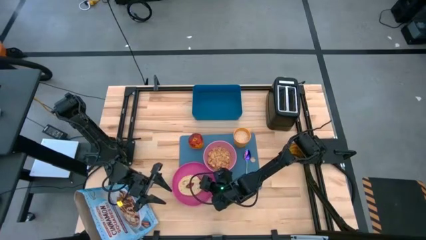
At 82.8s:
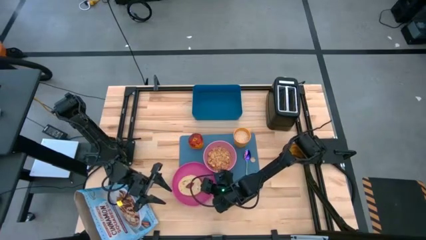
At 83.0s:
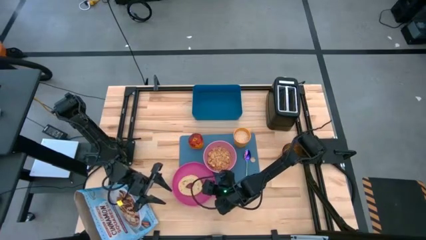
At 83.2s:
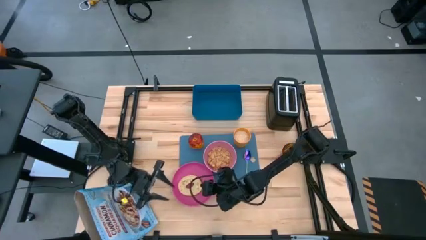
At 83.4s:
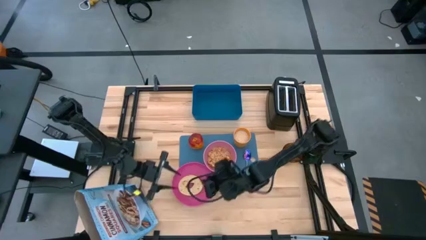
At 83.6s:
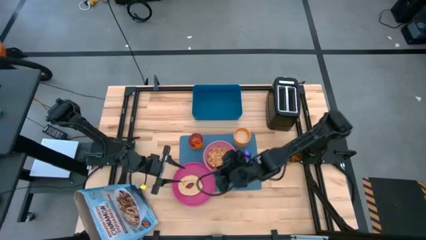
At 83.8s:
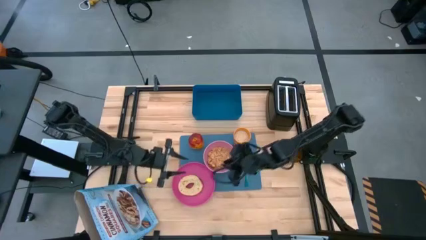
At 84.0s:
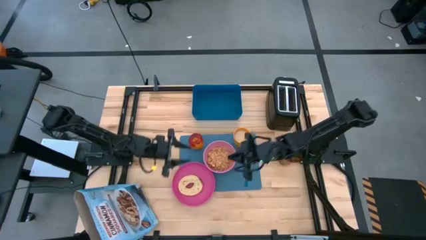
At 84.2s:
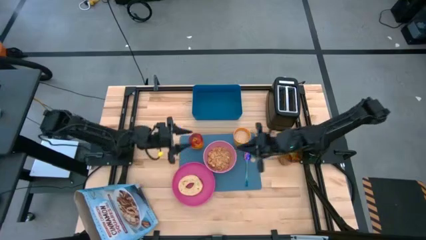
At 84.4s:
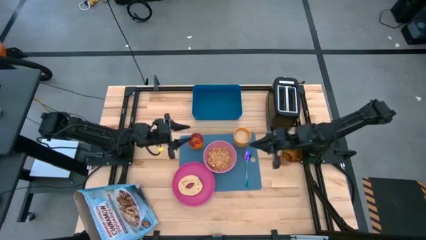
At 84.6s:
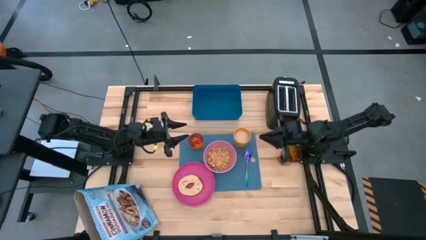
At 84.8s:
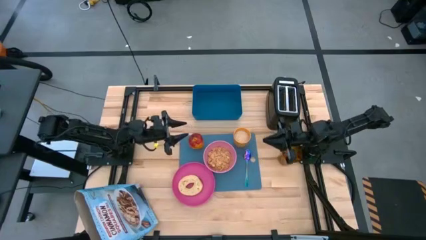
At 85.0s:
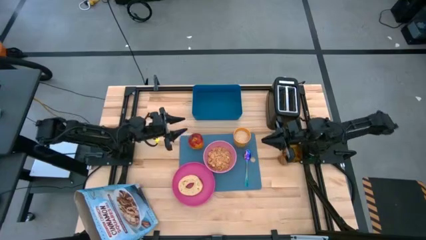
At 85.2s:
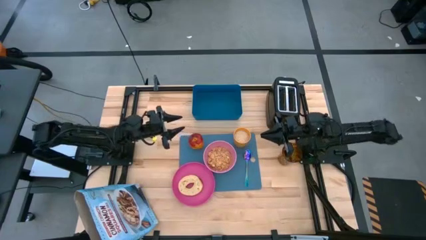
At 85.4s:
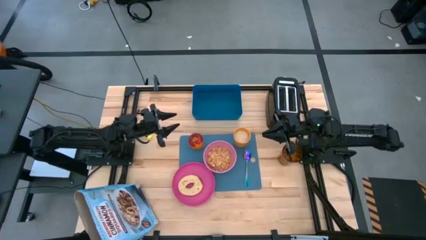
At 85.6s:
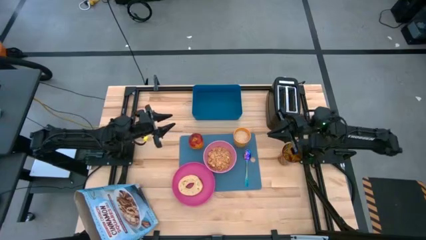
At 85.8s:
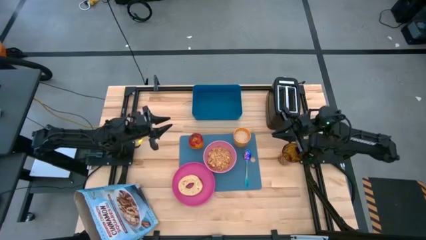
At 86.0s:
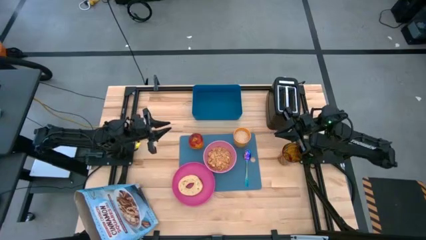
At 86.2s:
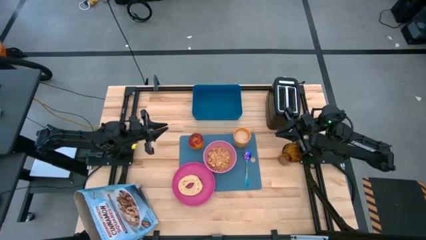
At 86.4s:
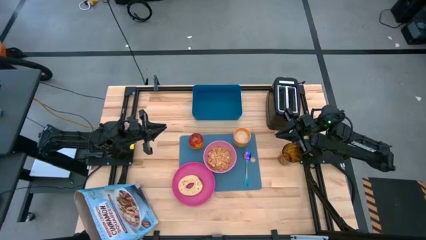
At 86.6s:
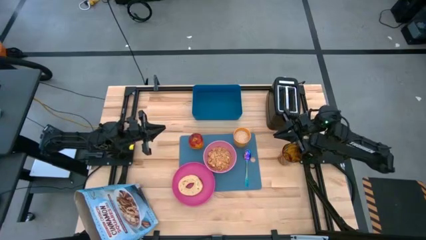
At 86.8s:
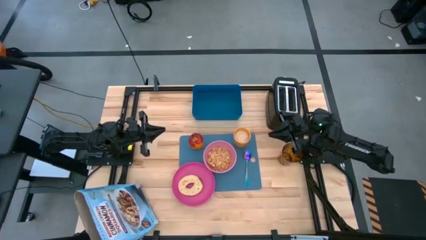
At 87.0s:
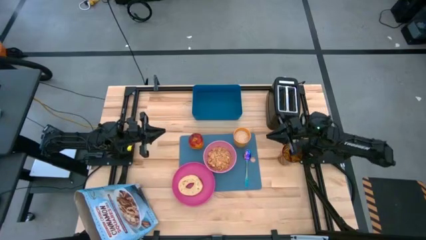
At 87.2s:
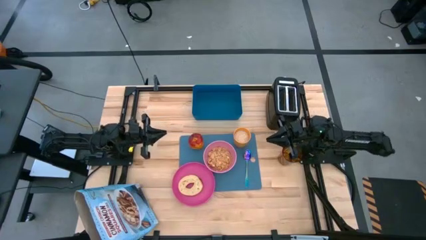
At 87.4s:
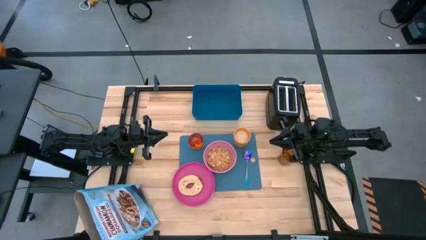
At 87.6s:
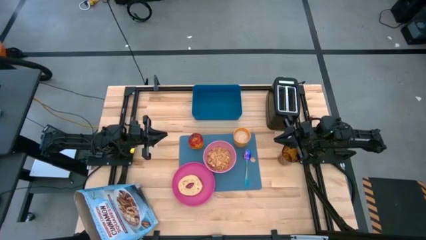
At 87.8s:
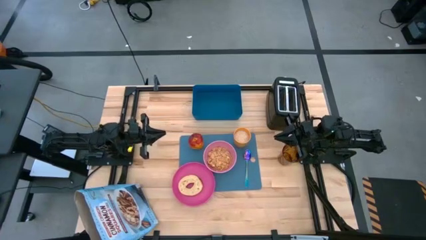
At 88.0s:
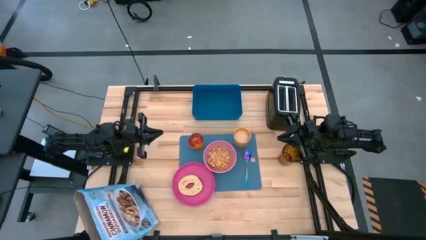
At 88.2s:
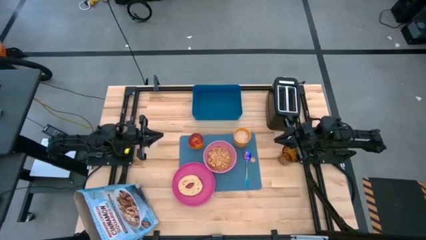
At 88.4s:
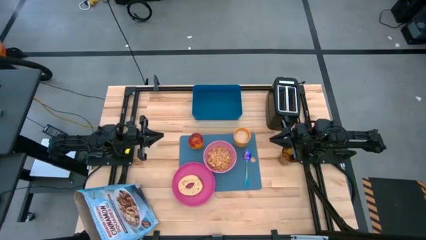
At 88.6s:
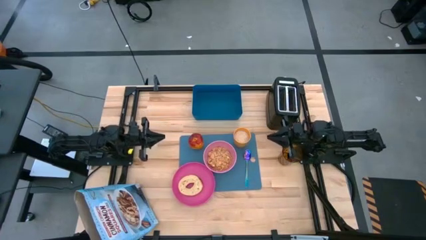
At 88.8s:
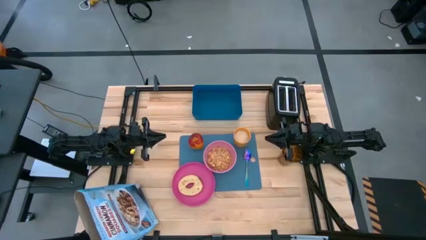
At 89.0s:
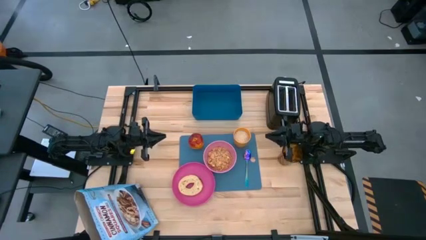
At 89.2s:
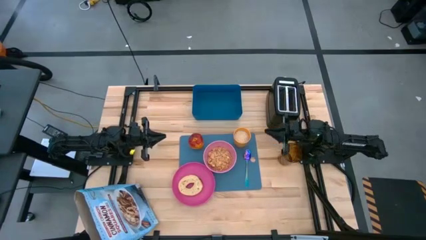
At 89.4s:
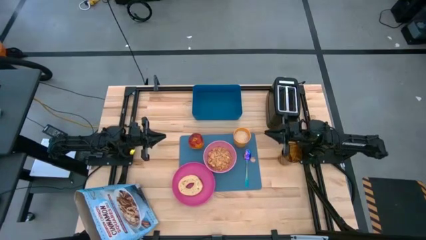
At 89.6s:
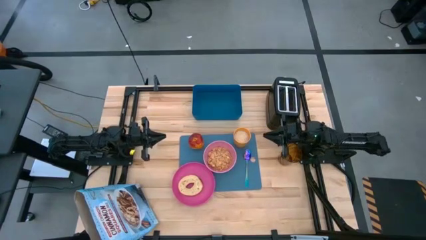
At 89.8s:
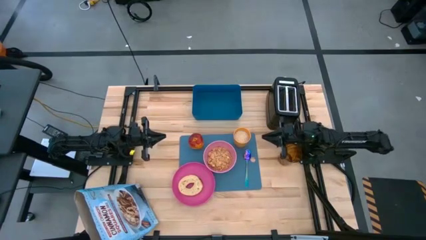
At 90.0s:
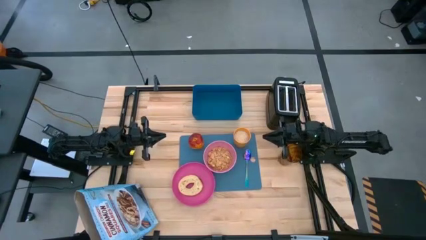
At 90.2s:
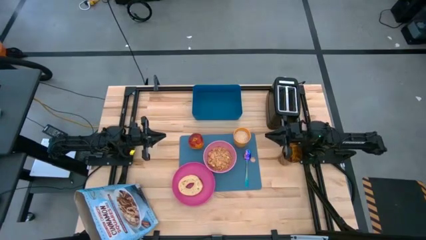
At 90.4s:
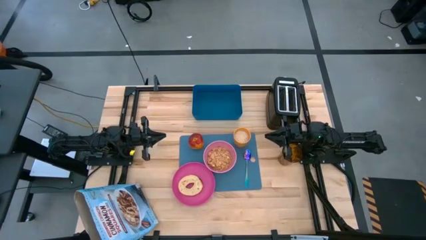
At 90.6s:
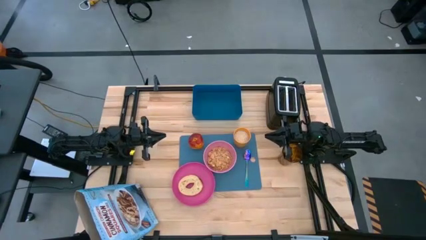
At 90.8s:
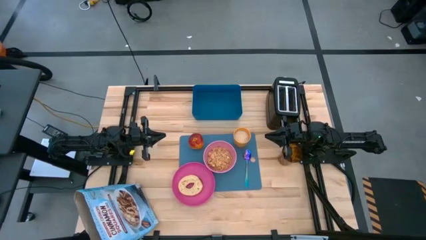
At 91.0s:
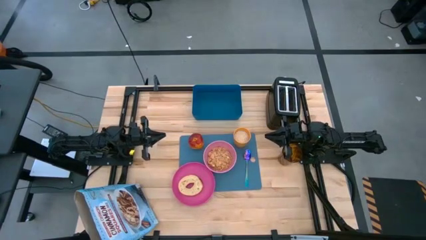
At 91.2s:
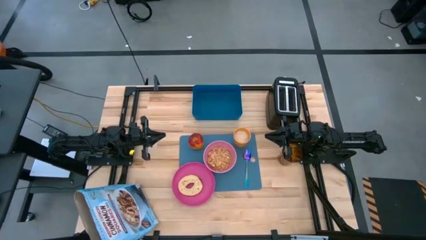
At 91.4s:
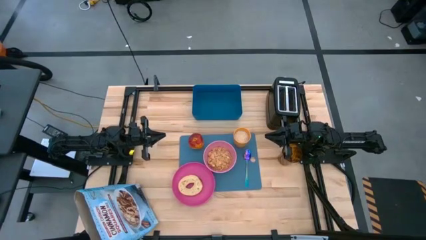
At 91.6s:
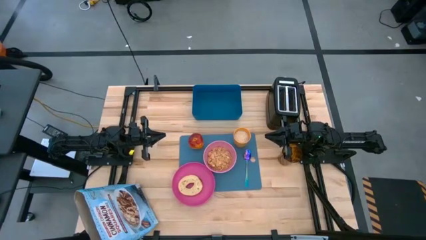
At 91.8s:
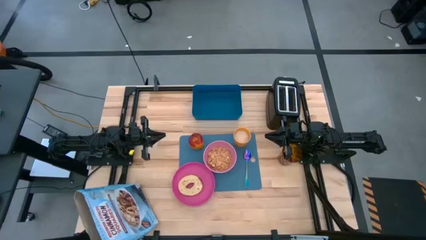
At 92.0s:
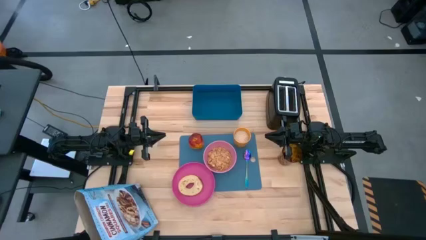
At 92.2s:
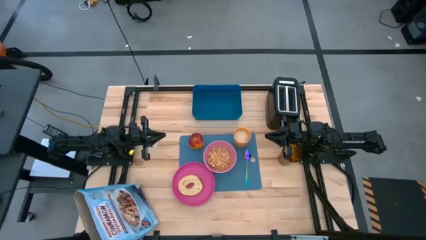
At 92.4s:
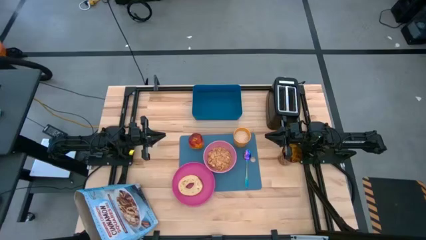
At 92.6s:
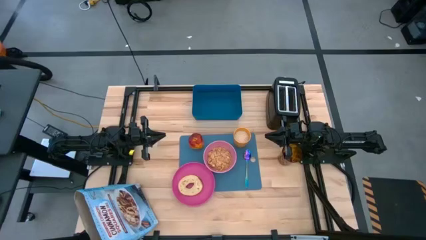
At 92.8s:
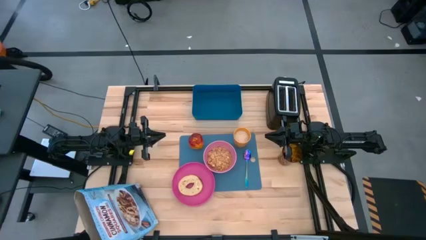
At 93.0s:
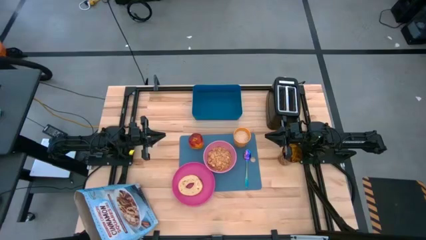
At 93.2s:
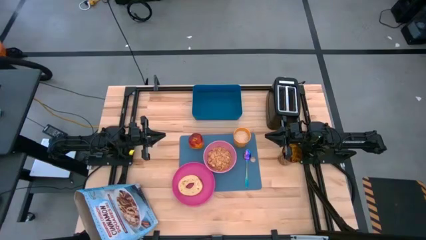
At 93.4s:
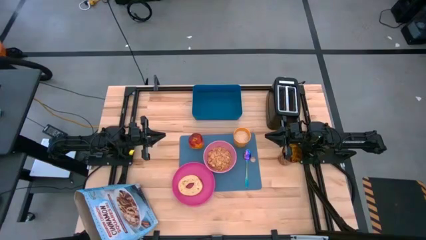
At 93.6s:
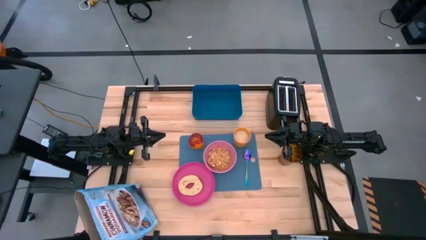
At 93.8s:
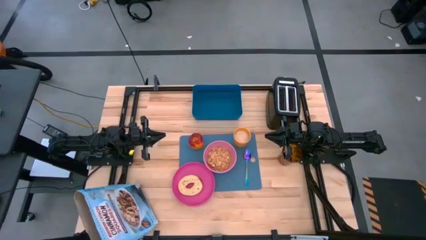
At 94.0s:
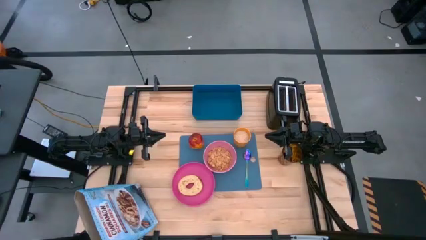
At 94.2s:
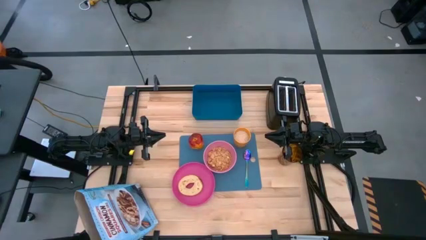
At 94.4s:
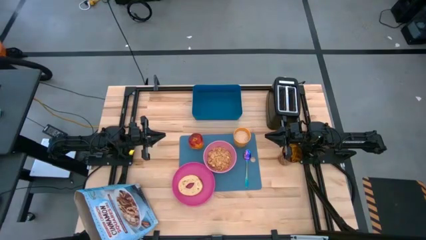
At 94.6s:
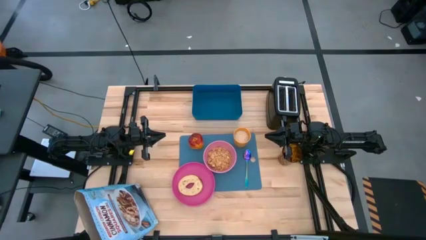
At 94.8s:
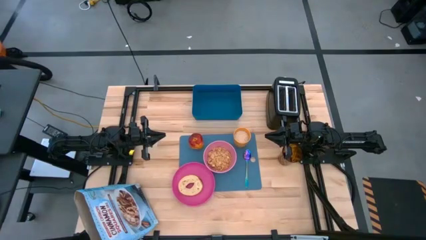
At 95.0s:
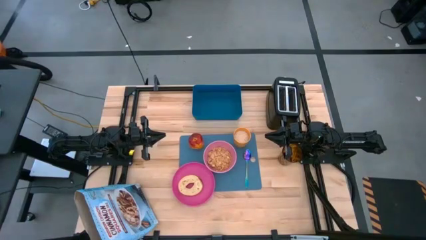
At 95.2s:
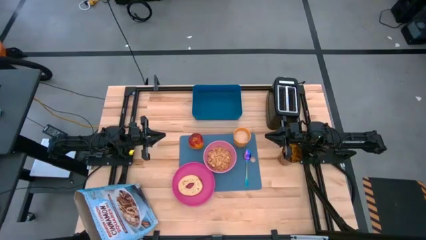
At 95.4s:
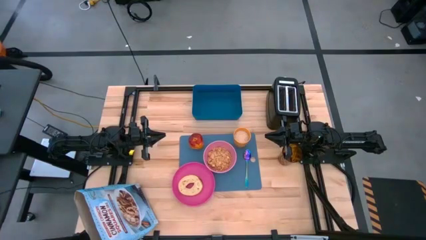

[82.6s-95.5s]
Task: Arrange a breakfast setting
Return to Home Position

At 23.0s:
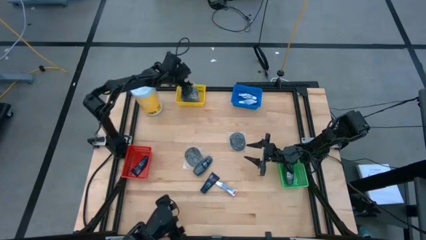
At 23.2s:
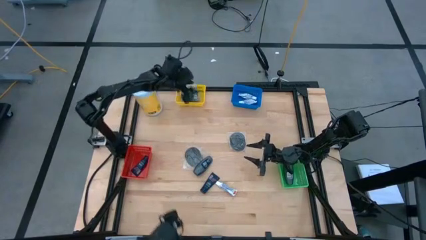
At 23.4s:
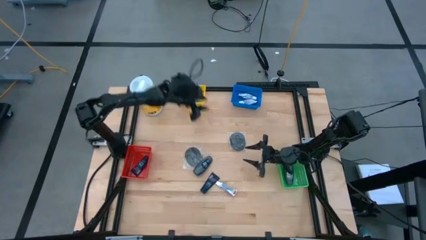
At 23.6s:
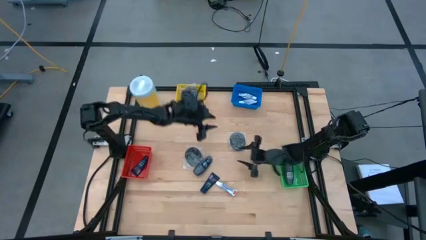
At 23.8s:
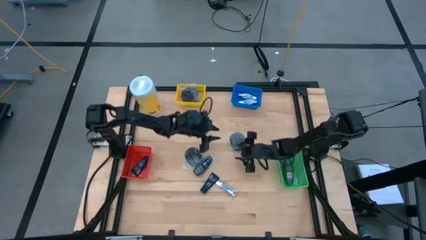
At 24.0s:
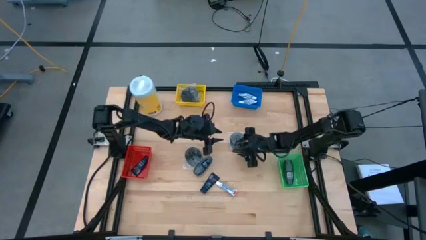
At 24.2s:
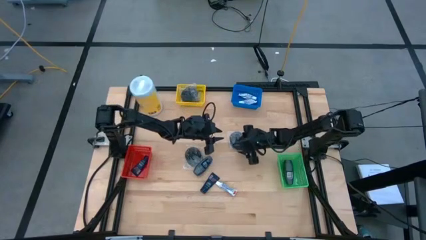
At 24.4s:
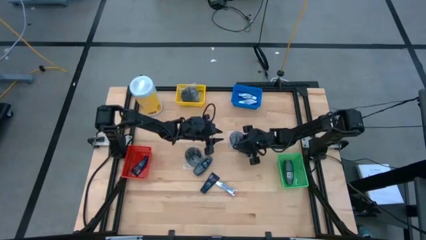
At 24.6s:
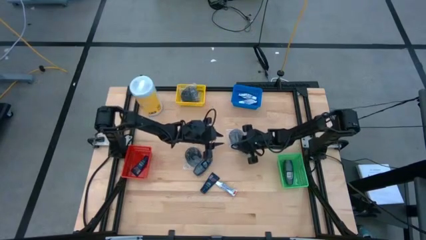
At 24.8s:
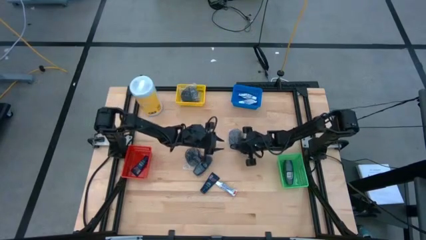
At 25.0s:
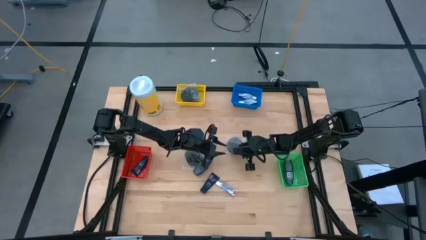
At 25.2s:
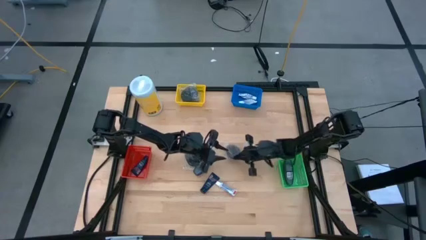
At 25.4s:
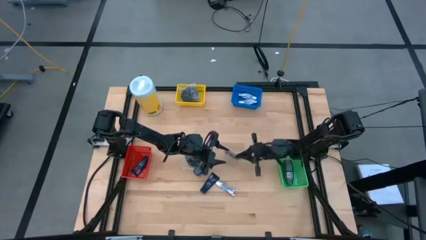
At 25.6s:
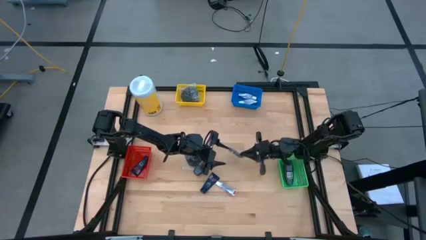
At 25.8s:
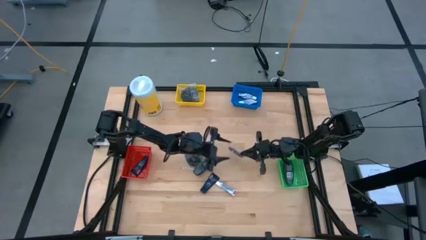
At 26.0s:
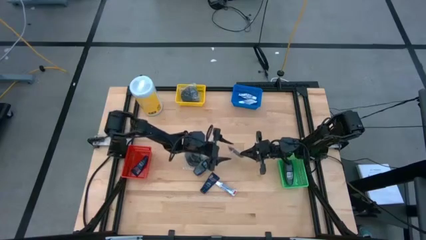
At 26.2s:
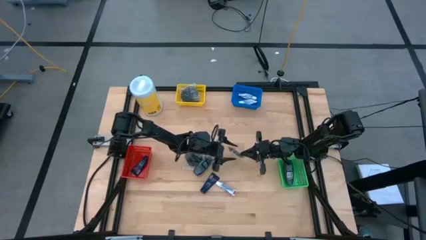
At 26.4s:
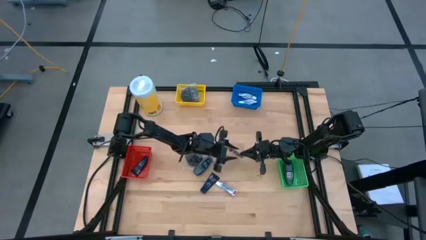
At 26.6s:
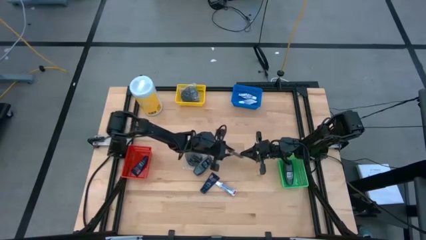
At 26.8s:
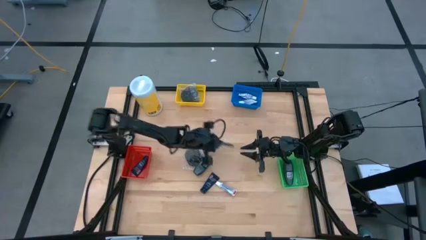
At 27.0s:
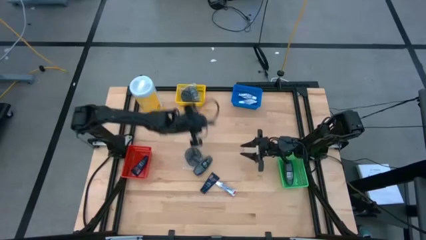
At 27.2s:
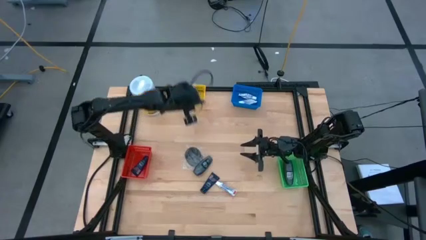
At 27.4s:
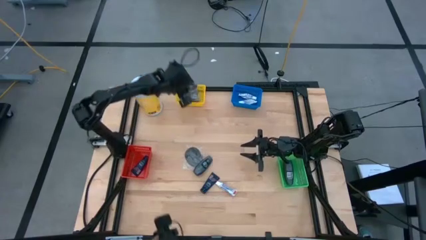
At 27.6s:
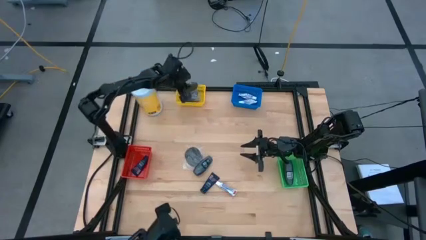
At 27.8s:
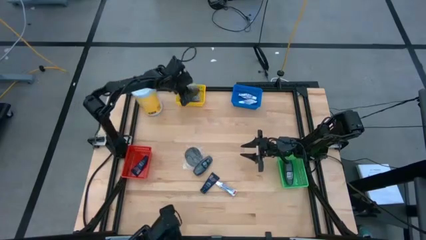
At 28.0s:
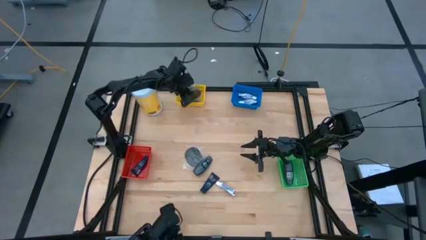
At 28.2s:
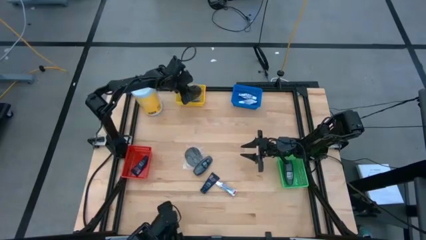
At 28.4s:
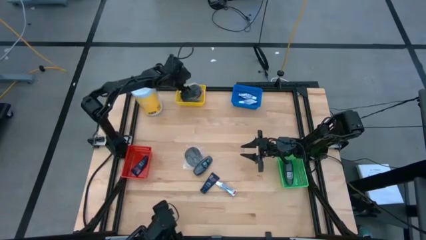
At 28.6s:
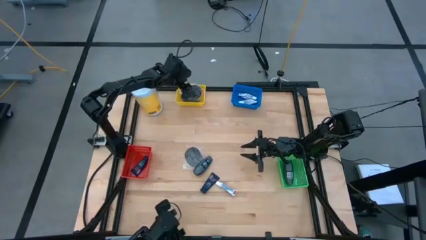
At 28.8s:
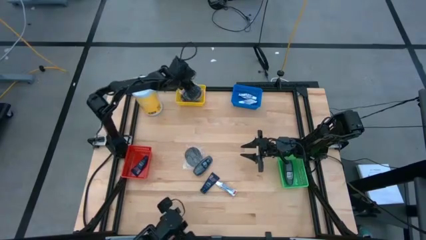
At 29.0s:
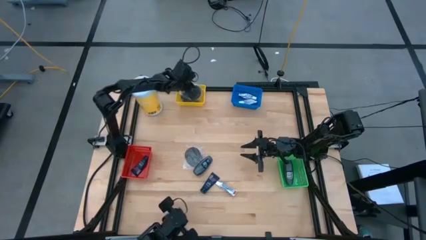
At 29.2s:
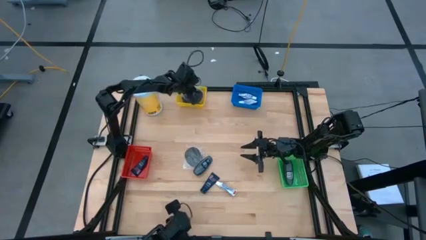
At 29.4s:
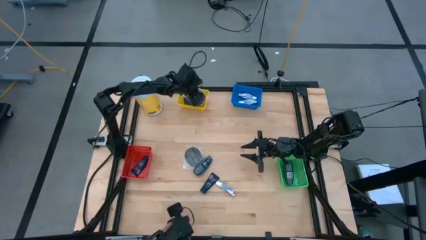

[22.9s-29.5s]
Task: Pick & Place Travel size toiletries
Put the black hairbrush into the yellow bin
